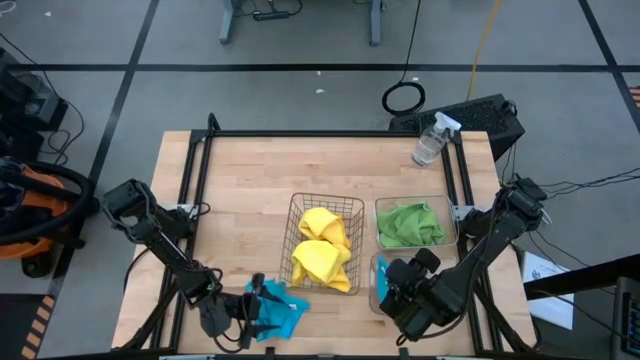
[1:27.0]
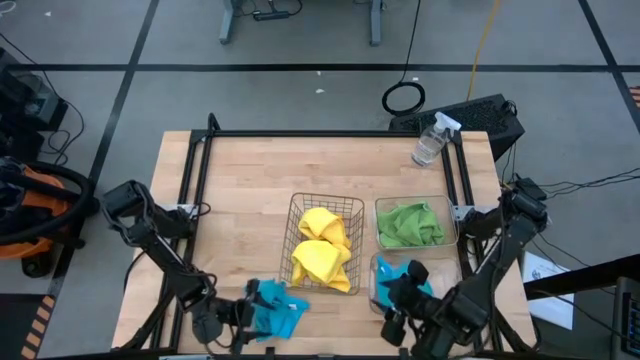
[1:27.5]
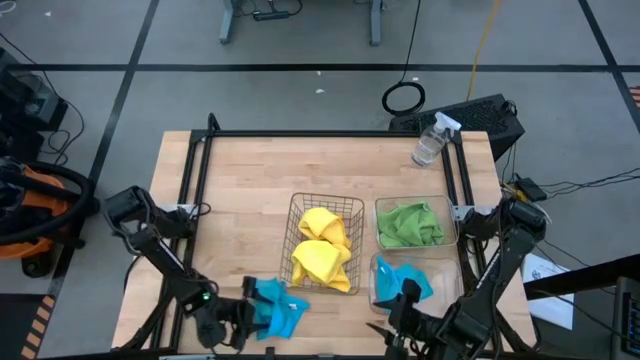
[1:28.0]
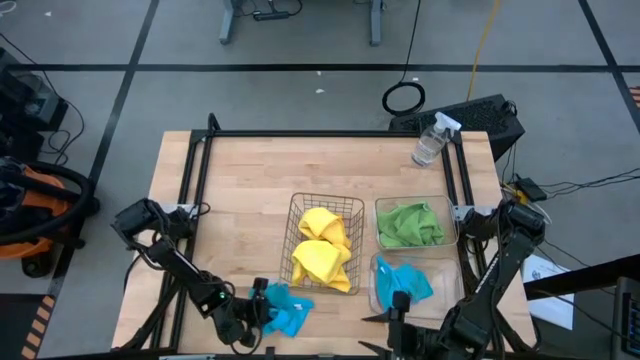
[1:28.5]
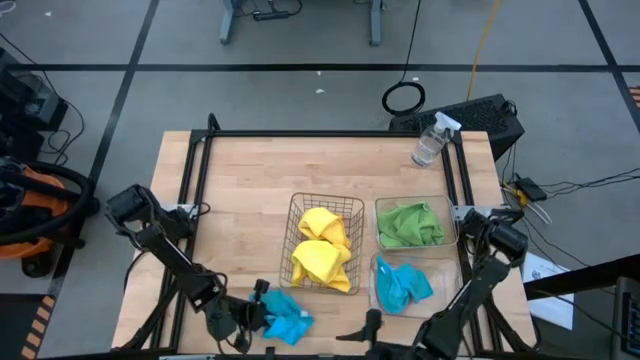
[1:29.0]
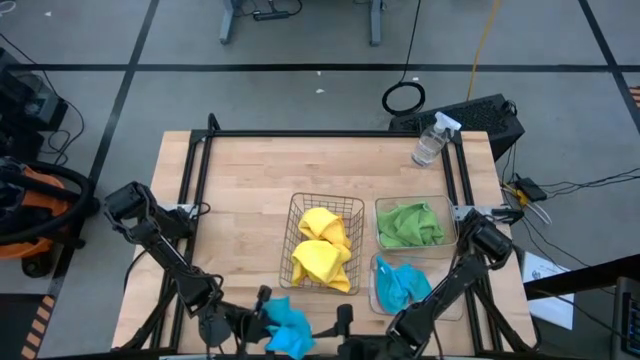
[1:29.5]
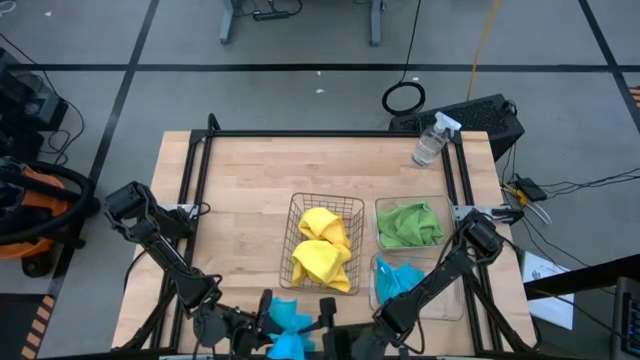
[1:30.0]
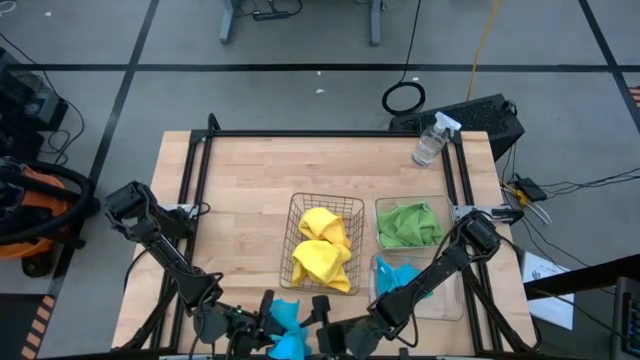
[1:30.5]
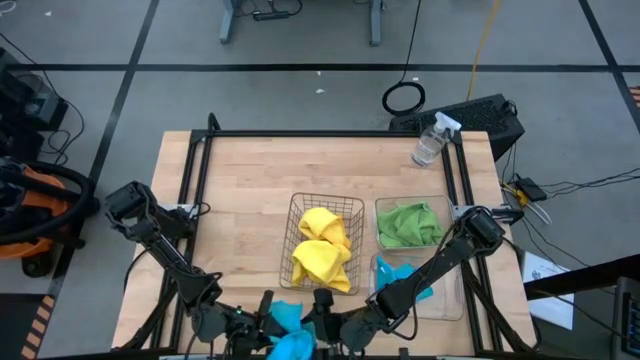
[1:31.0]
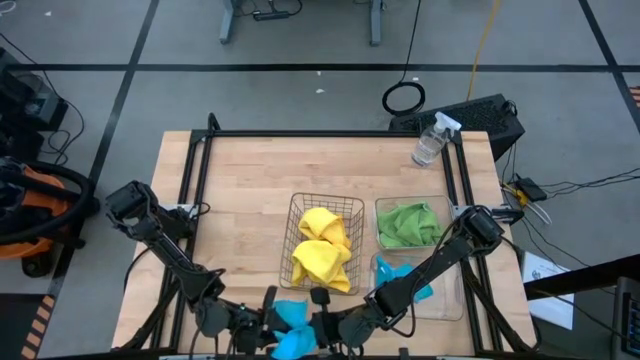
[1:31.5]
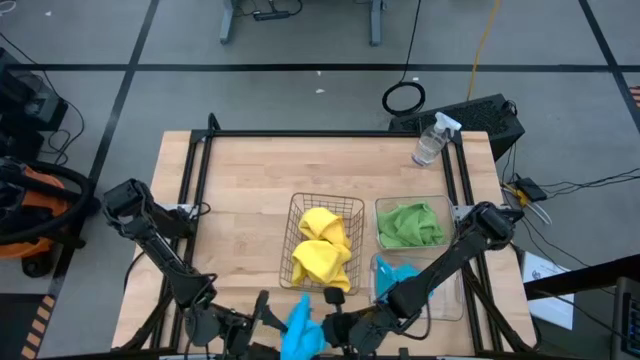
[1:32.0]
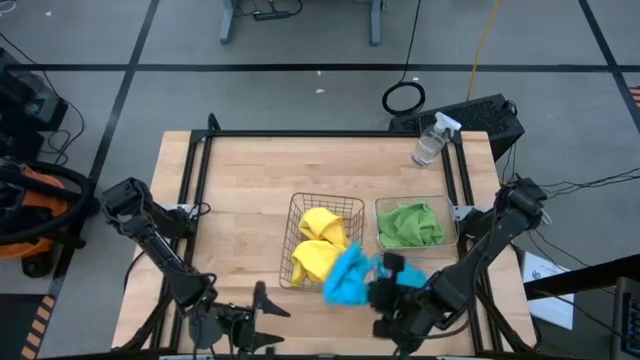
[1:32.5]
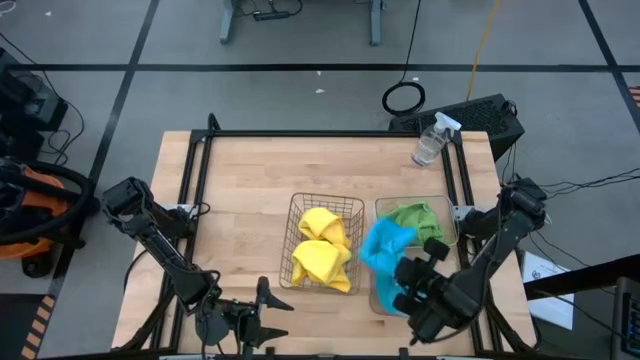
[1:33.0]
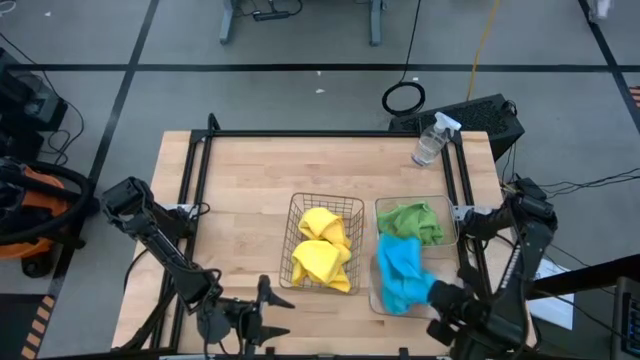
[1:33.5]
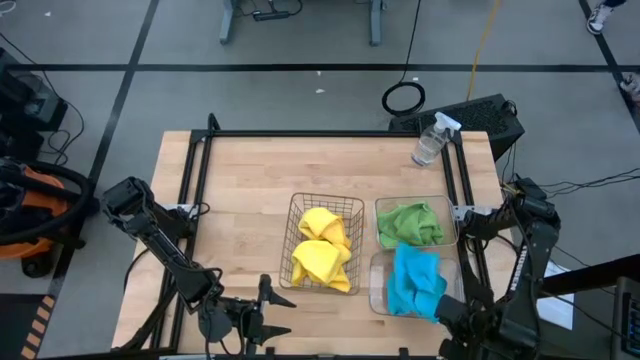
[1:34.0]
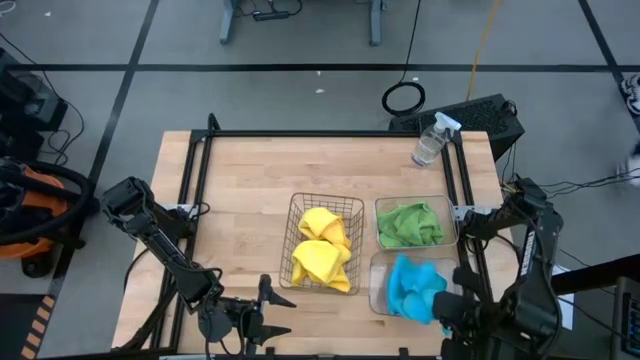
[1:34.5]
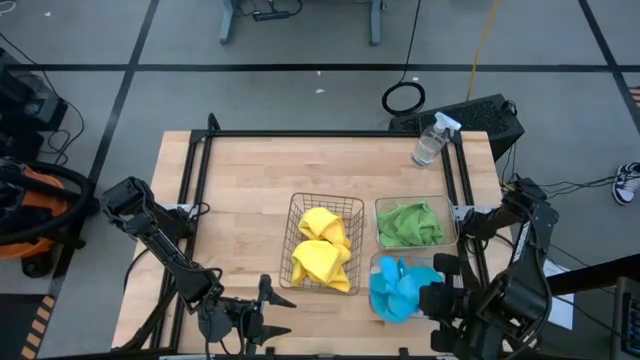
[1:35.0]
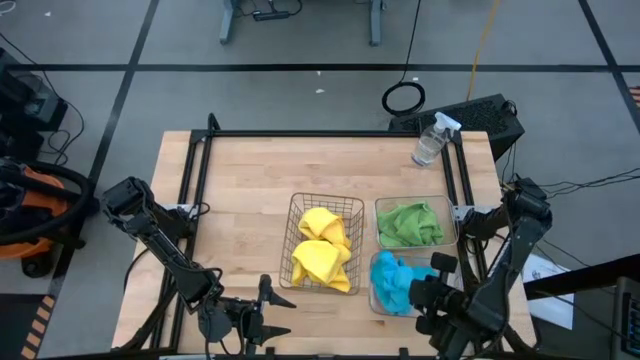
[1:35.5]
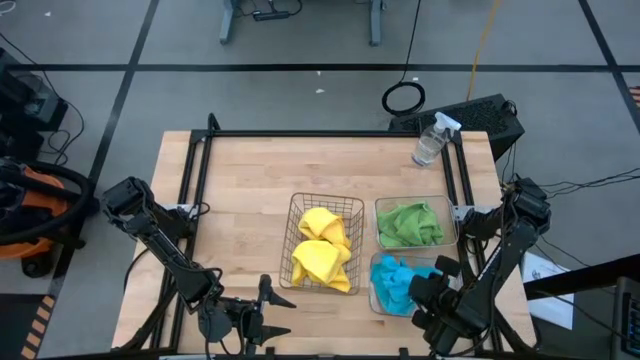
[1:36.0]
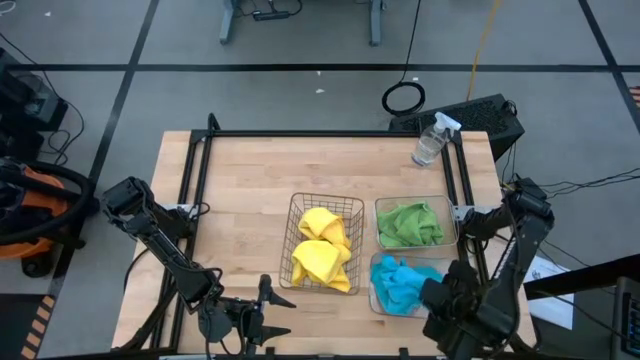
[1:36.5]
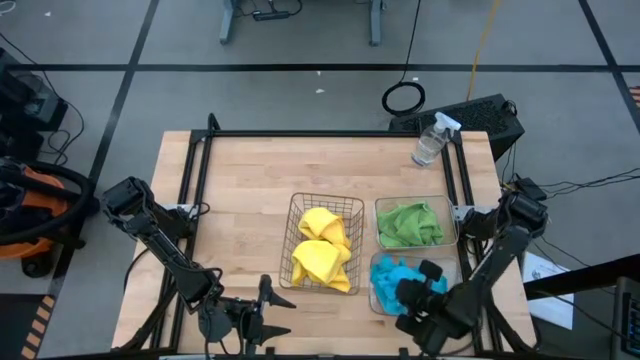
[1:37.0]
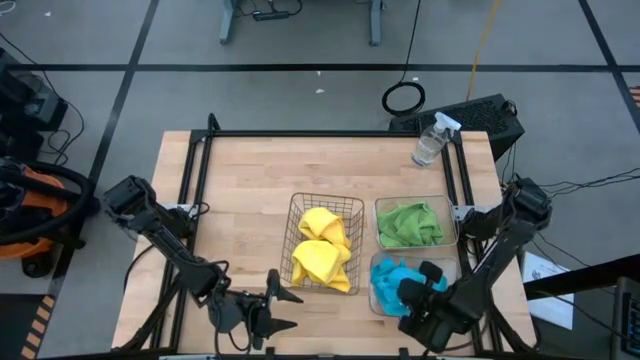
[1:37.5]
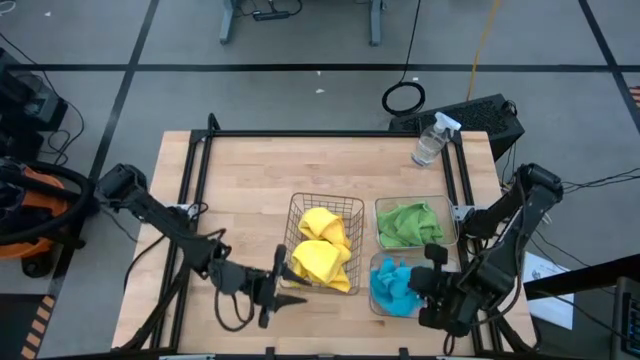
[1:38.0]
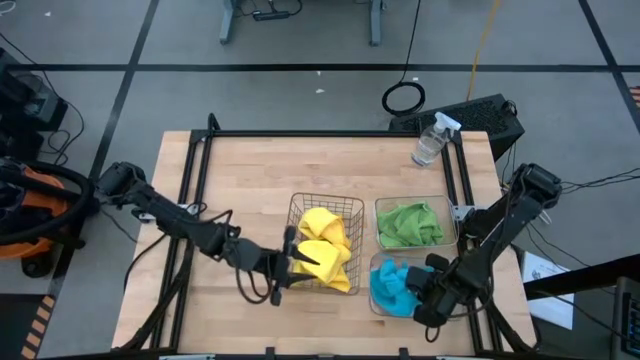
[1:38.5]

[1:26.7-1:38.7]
Task: Sort microfiber towel by color & place in baskets
Put the blue microfiber cloth into the bottom transparent bin

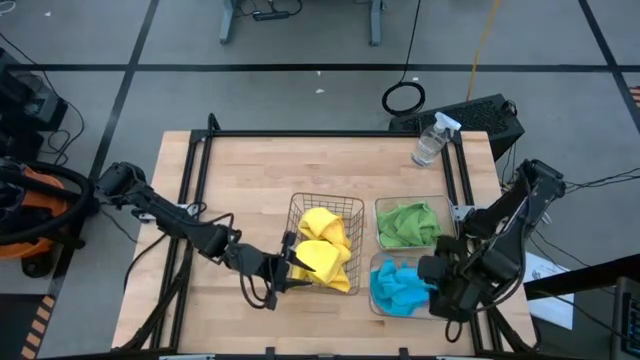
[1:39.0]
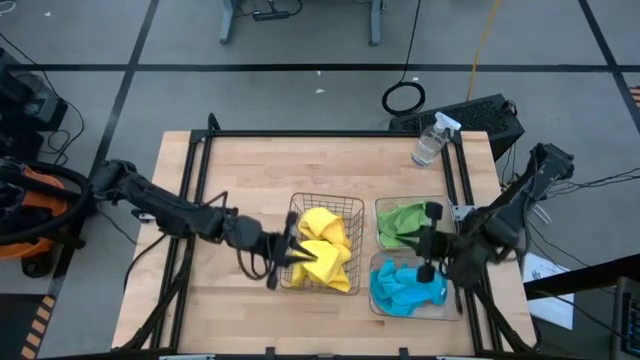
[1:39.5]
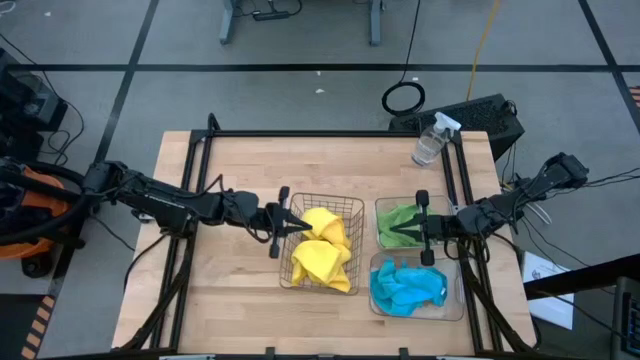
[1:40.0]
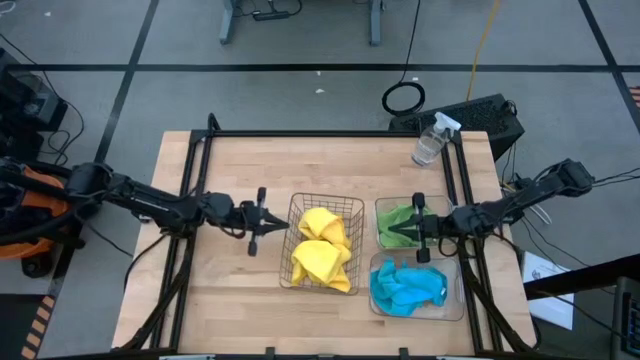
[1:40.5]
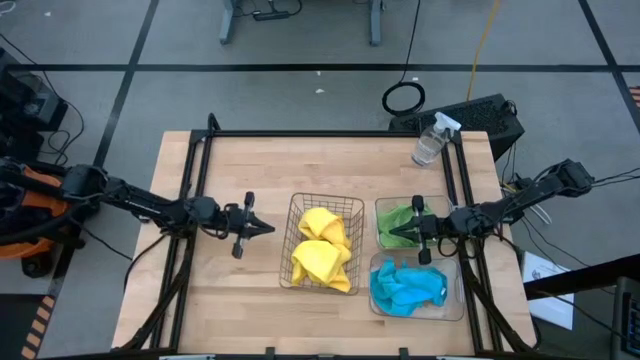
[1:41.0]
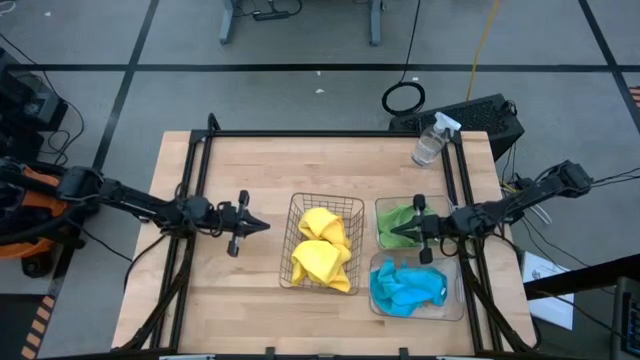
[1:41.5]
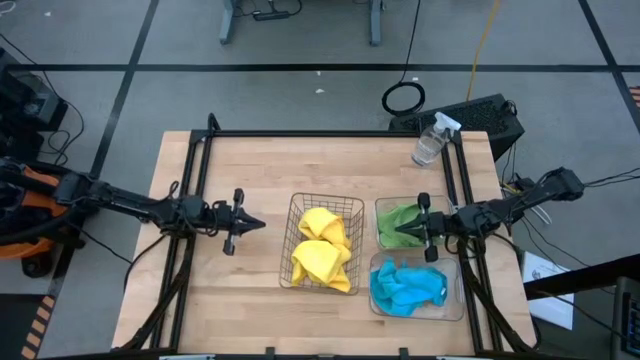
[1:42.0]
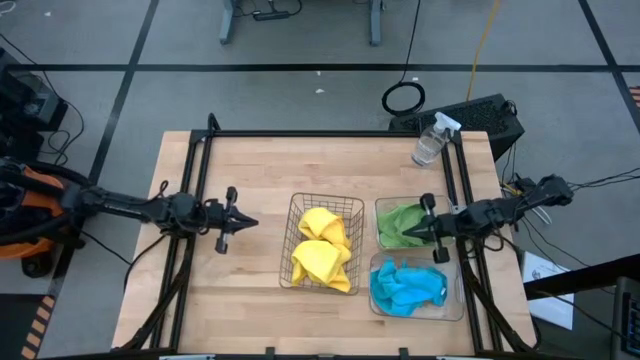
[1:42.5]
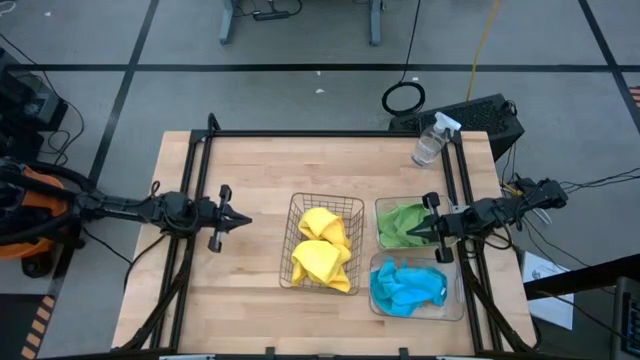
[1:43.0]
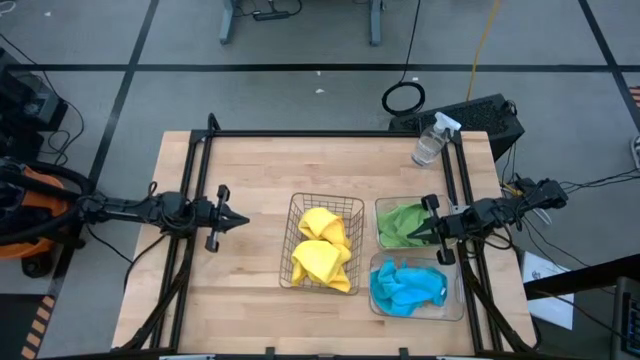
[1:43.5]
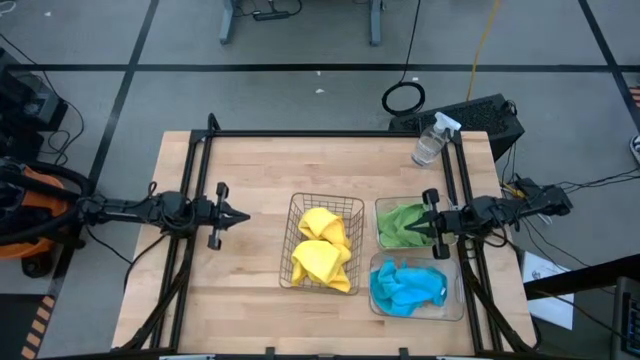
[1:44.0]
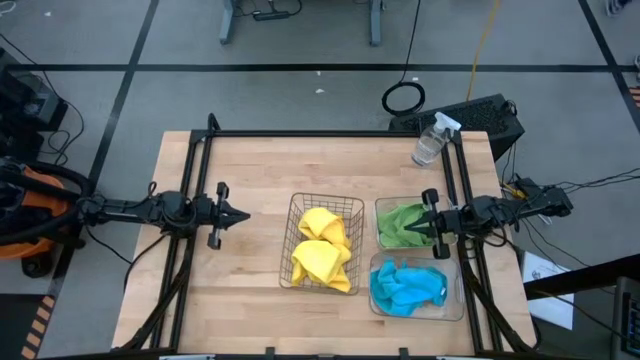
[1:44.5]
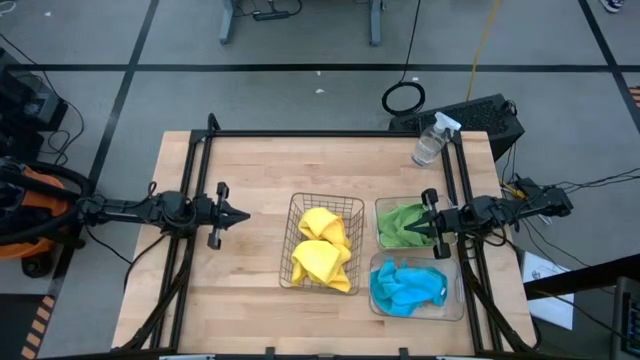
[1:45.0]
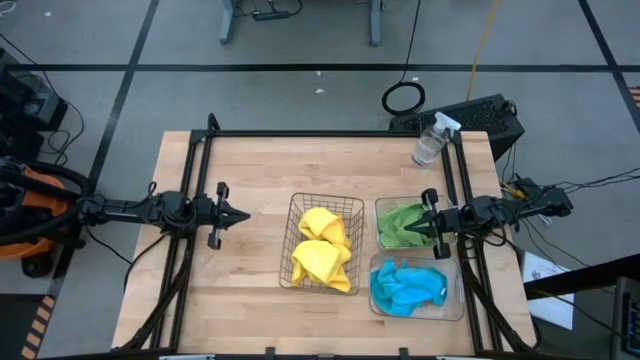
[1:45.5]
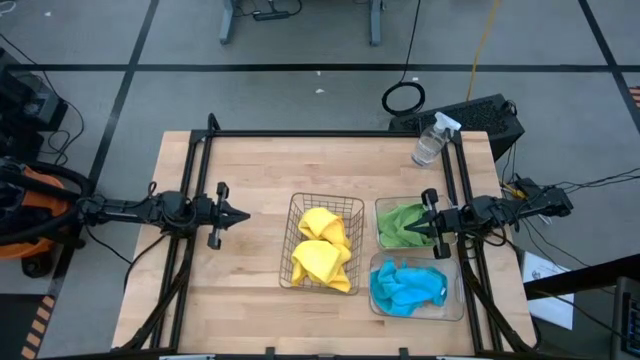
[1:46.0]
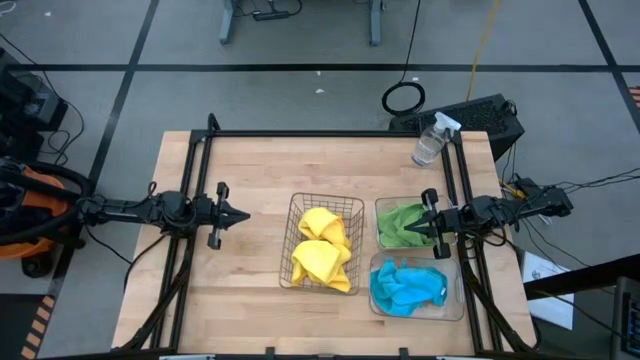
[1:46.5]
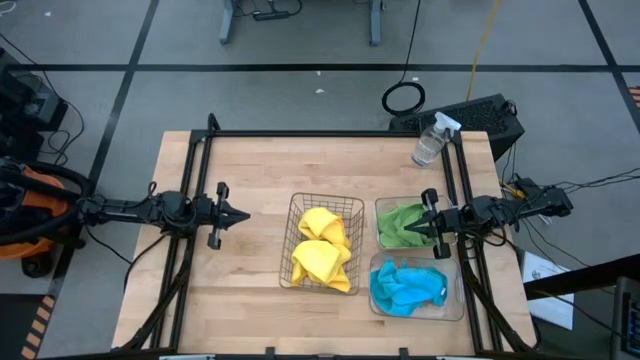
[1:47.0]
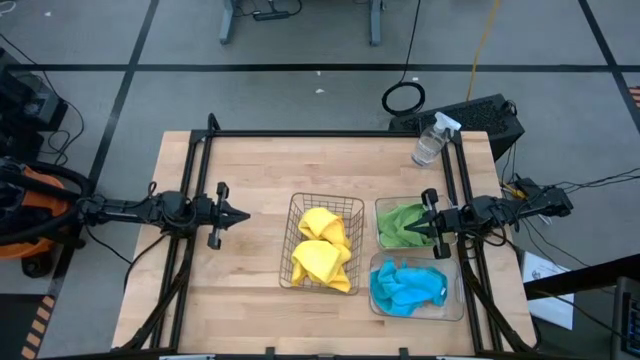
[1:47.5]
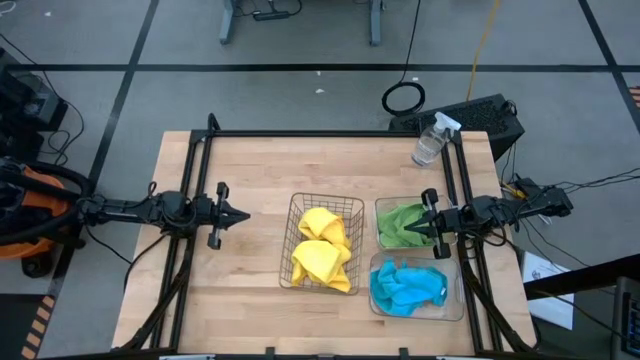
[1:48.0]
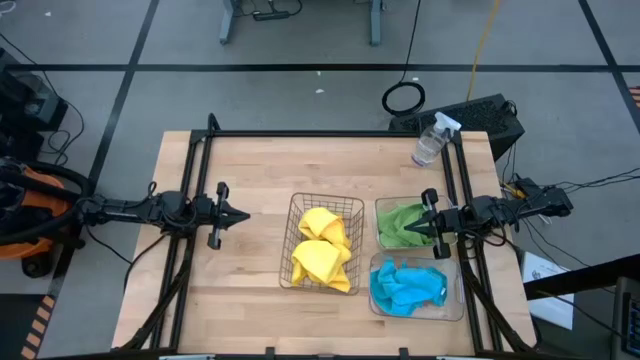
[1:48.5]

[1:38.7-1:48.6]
Return to Home Position
